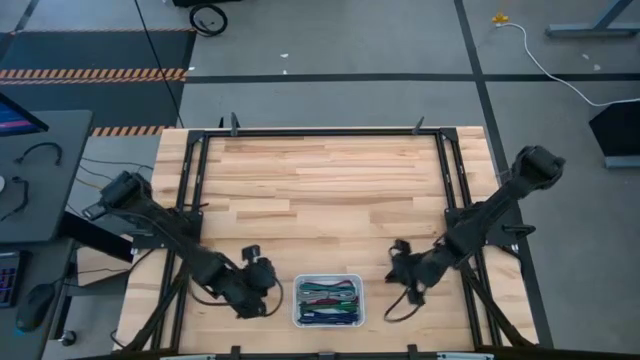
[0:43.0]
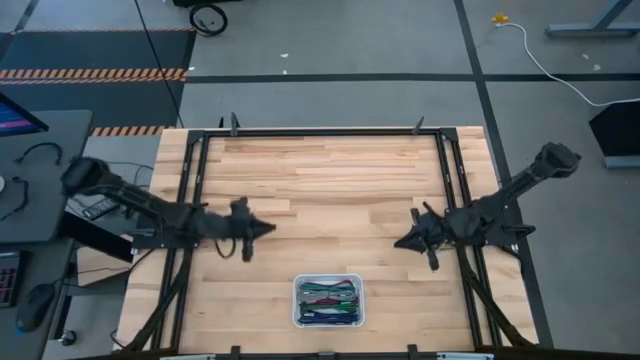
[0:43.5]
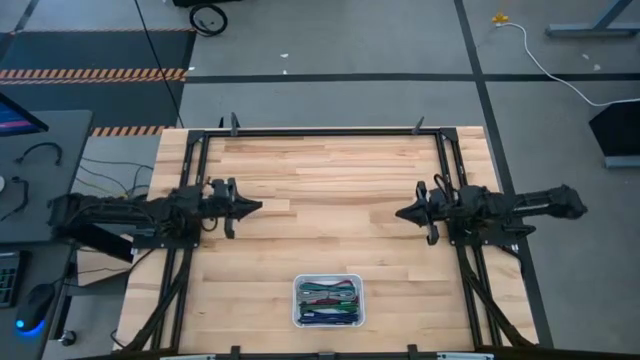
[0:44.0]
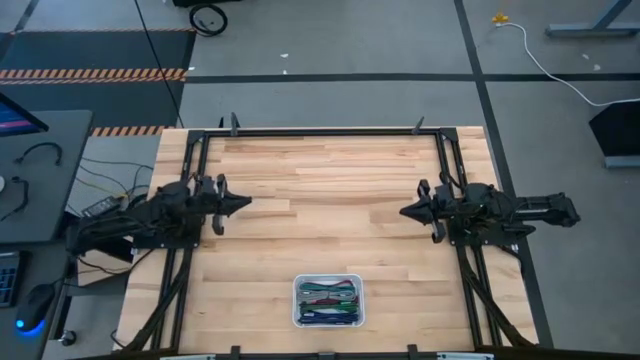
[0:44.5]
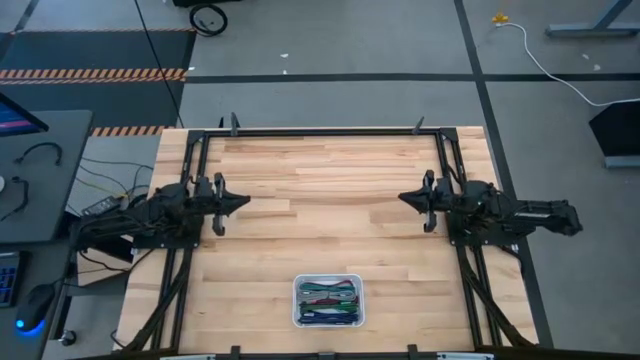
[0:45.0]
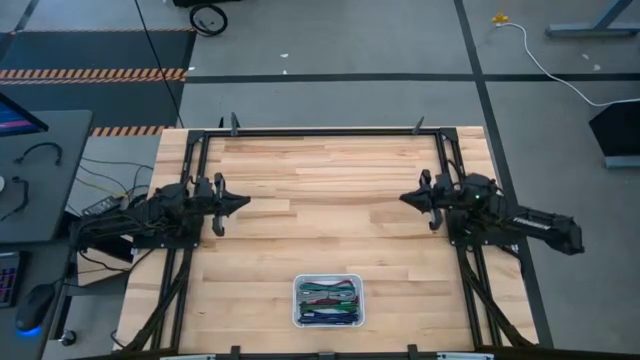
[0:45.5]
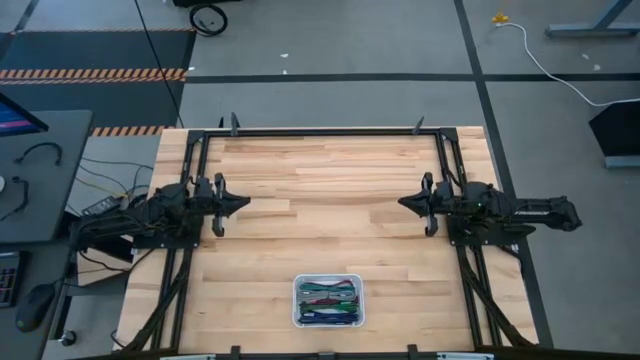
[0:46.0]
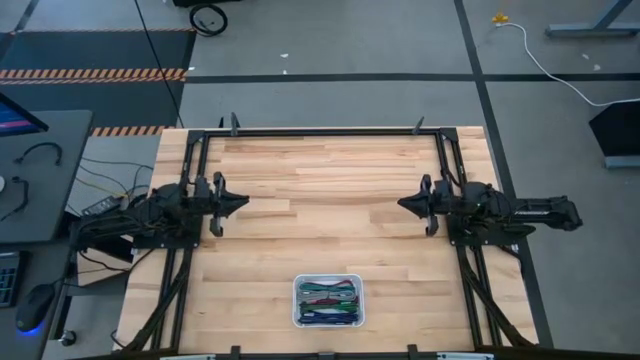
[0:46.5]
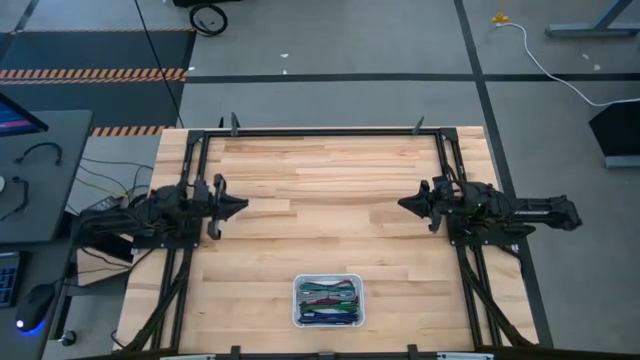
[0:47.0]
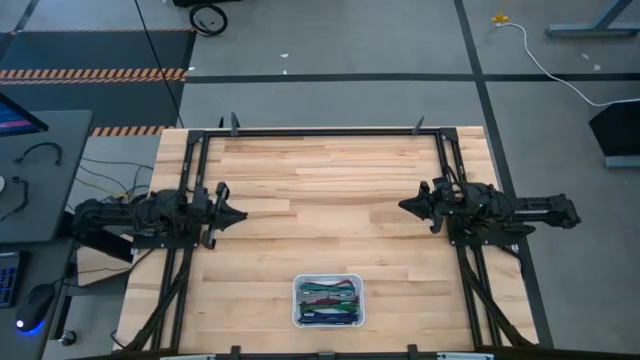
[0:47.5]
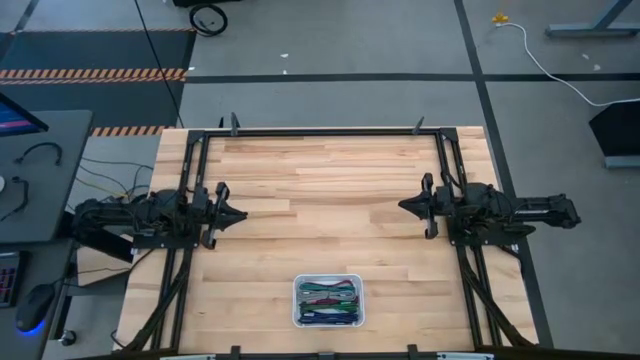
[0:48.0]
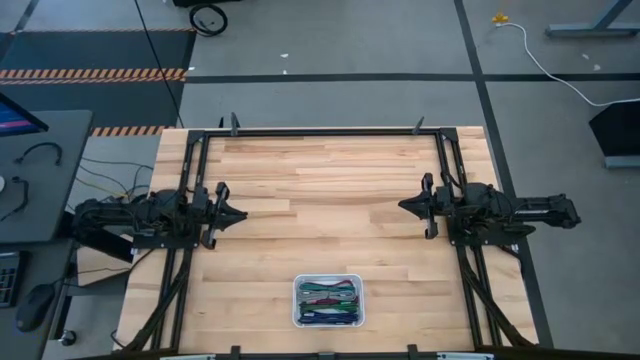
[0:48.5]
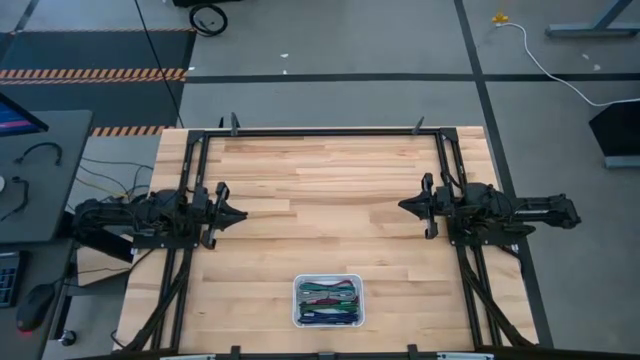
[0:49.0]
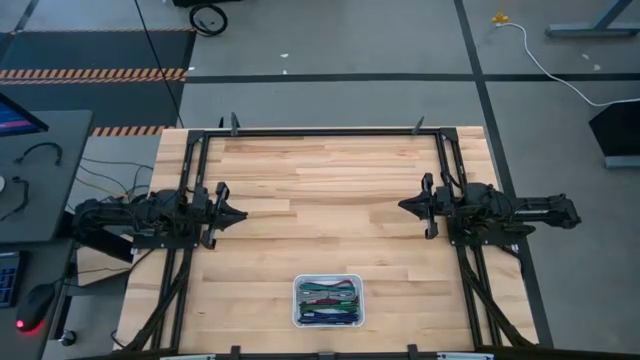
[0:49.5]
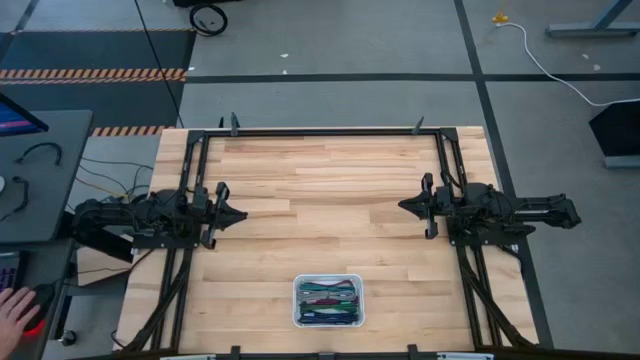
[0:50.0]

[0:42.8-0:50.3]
Task: Pick and place USB-C Cables
Return to Home Position

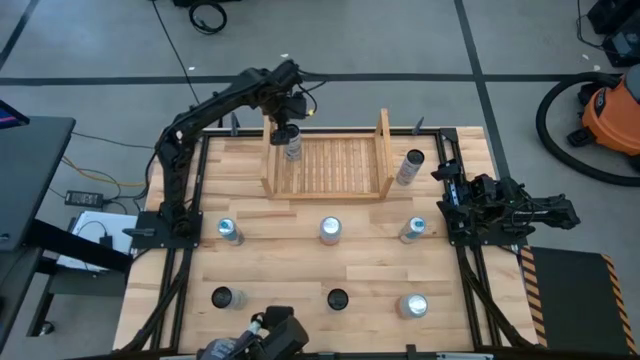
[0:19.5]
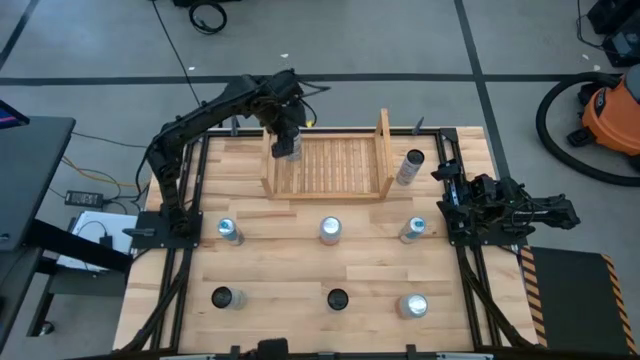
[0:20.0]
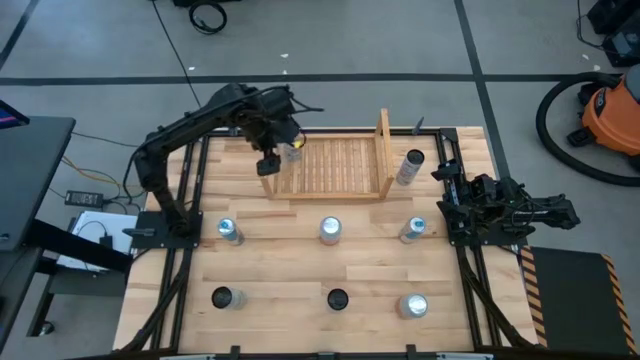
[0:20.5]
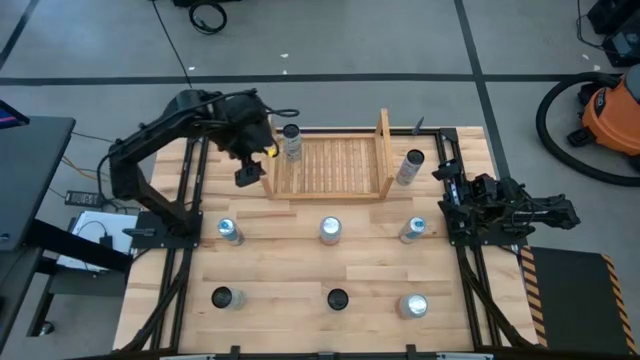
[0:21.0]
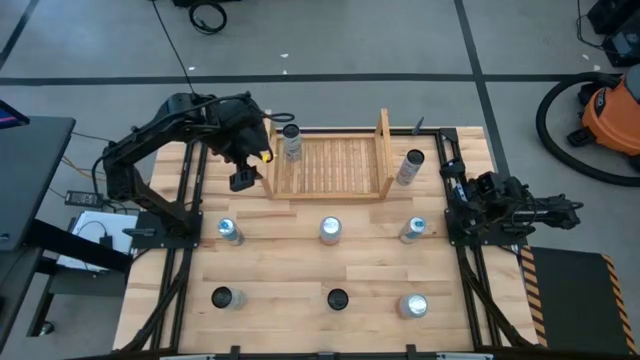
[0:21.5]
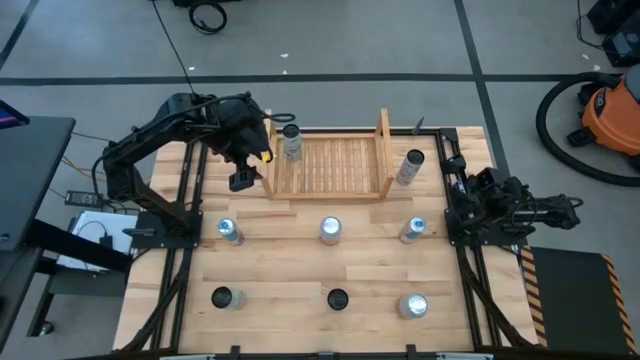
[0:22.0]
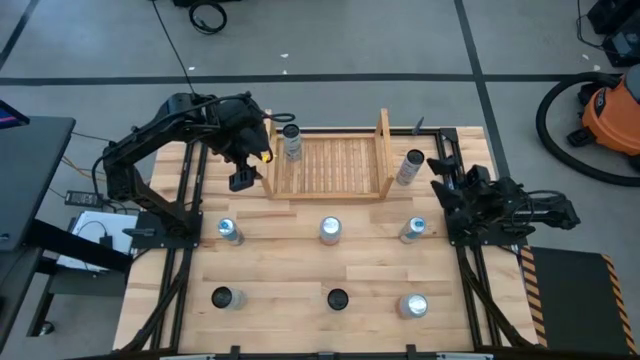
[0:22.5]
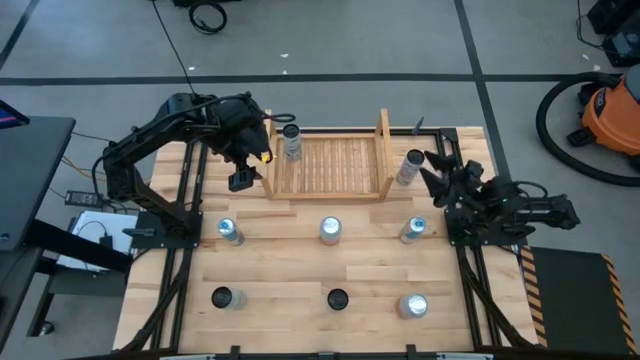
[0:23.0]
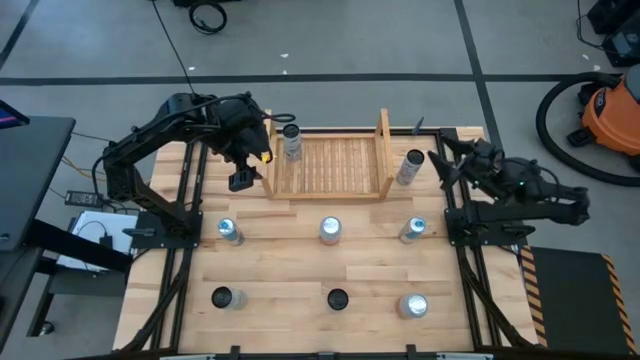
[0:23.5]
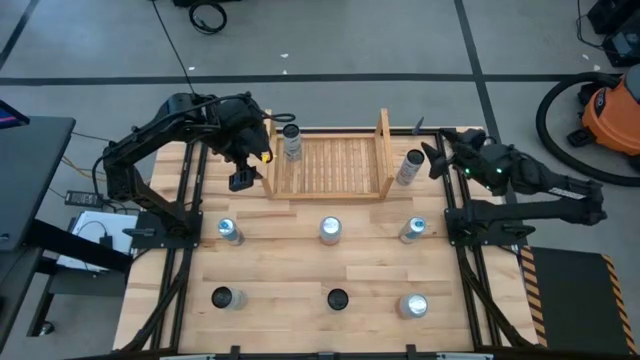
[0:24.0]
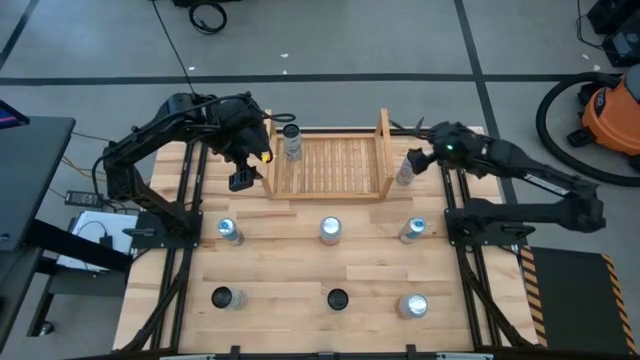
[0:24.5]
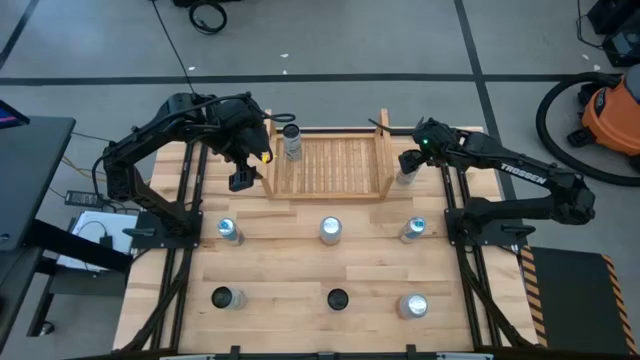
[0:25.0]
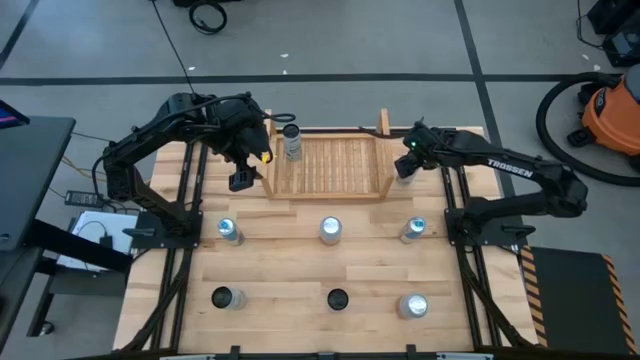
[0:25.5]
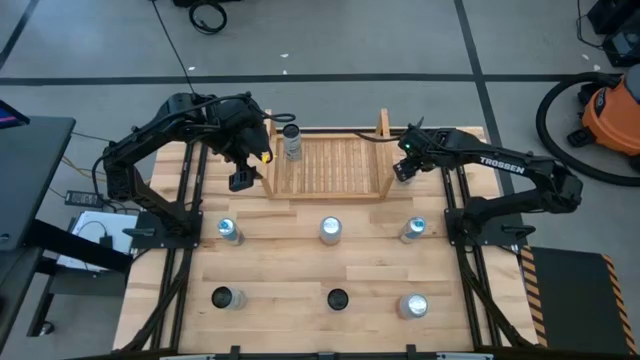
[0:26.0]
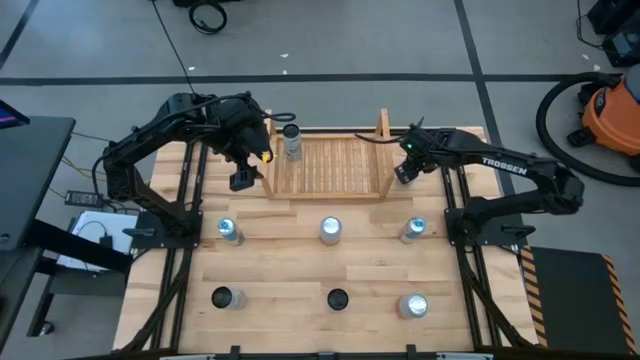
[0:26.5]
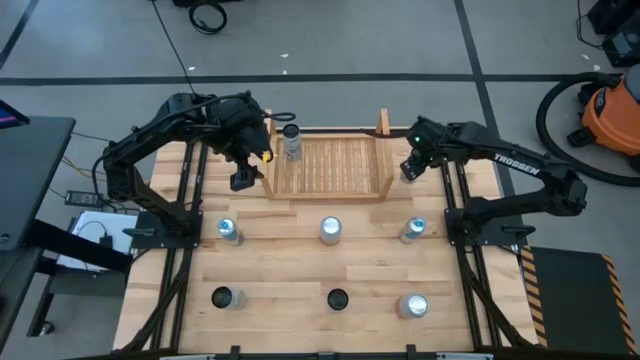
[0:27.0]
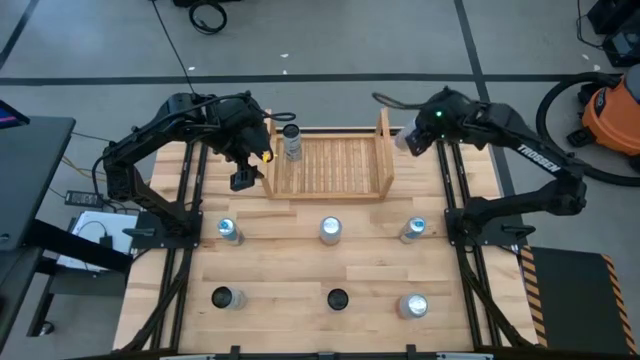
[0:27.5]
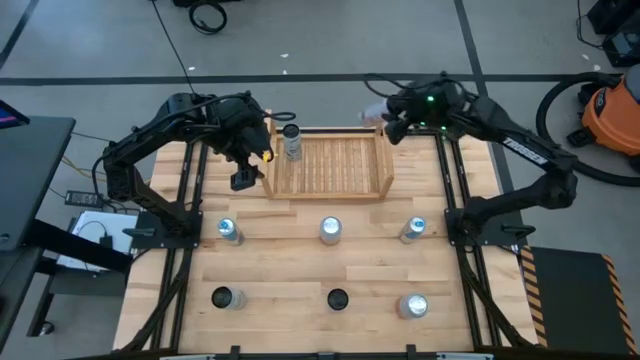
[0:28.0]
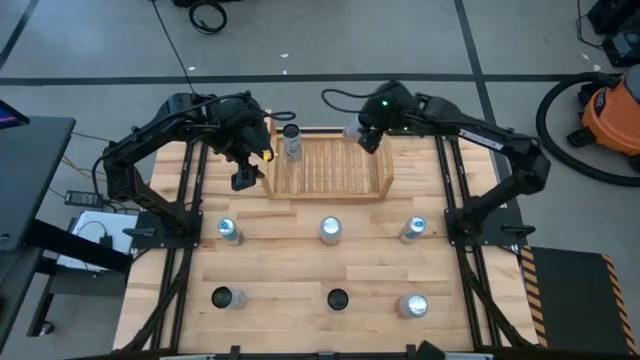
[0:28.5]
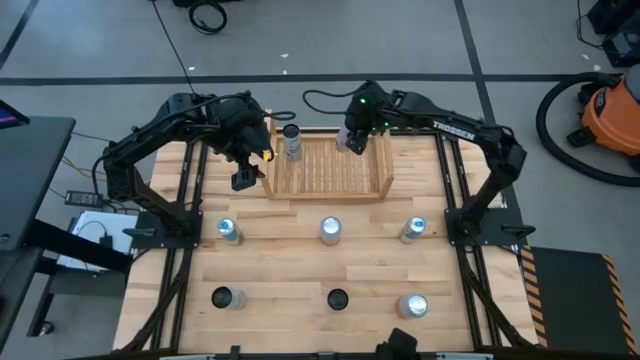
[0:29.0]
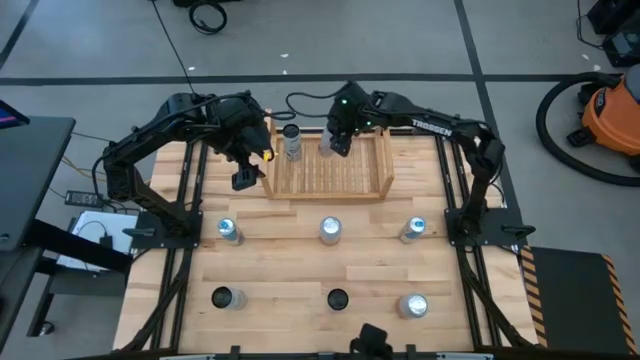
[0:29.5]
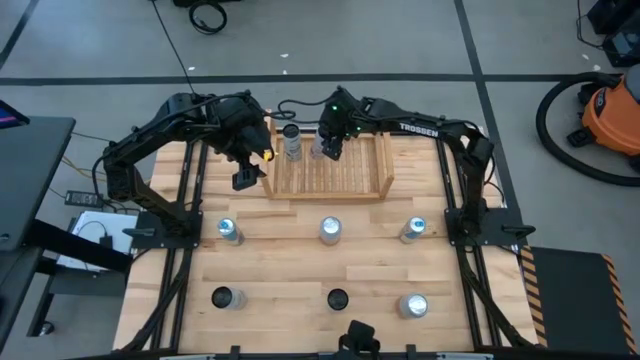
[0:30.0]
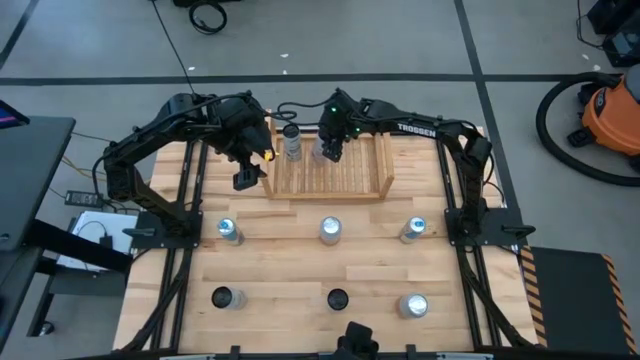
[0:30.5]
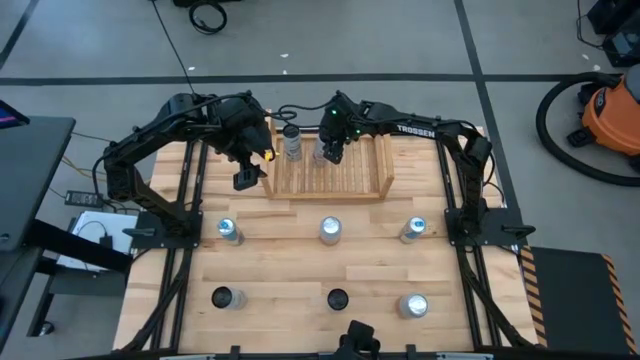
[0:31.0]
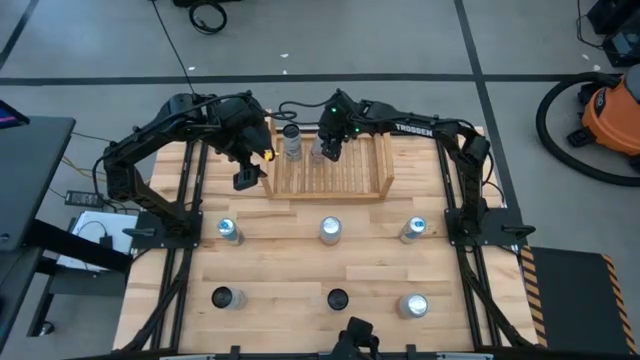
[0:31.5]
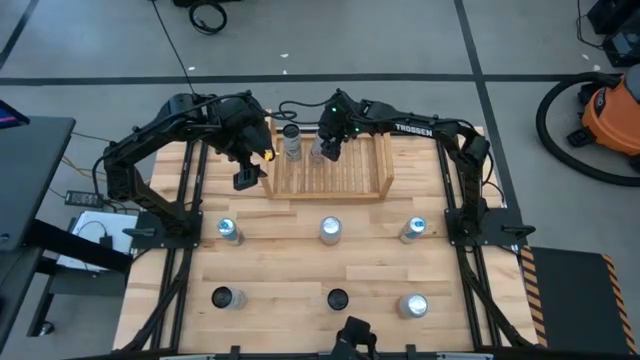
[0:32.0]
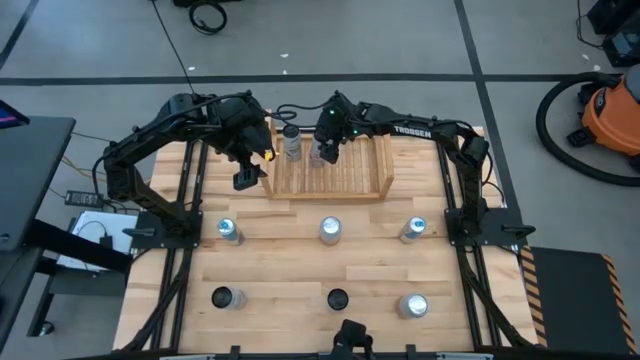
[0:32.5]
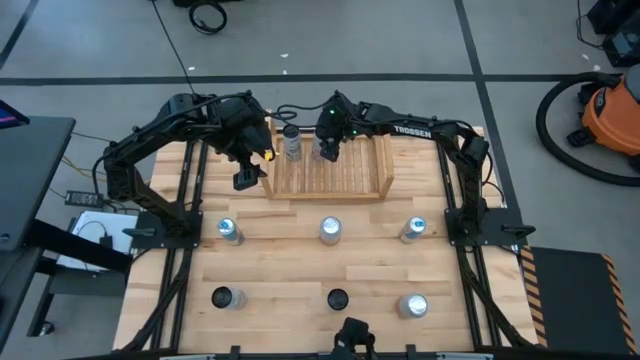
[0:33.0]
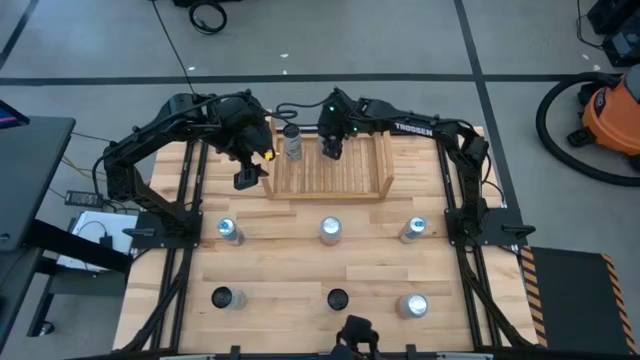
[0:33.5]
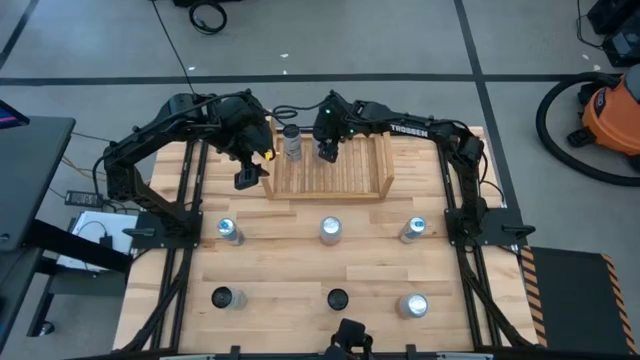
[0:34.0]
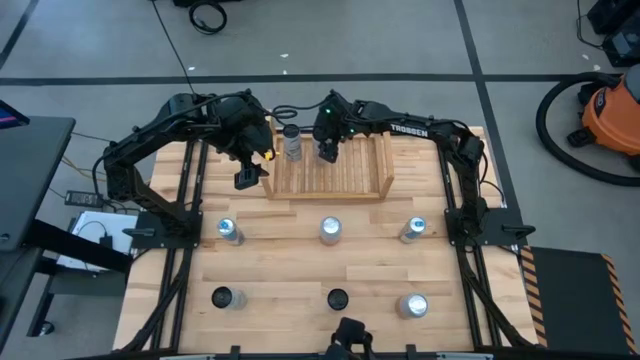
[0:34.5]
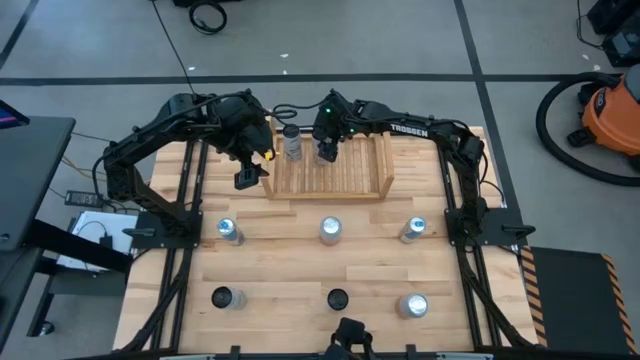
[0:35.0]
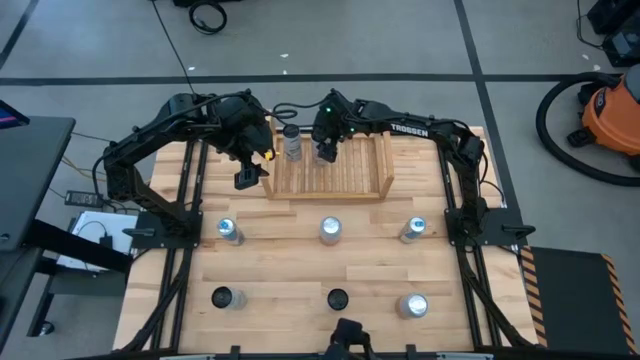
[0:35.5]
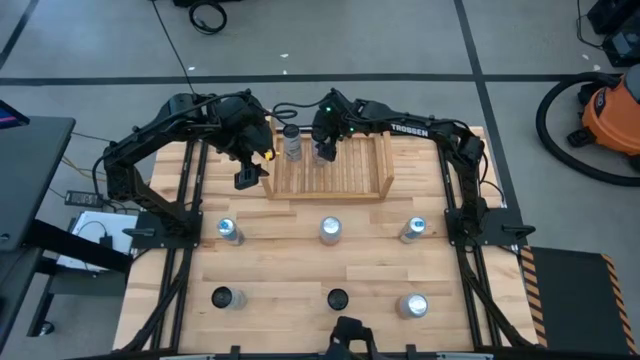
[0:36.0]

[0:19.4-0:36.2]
Task: Place canned beverage on shelf
Put the top white pink soda can into the shelf
